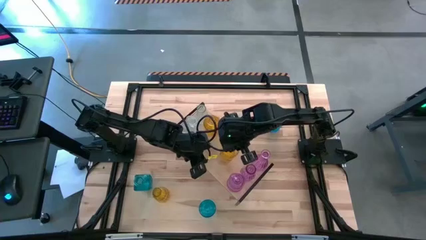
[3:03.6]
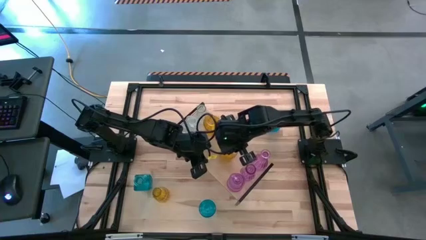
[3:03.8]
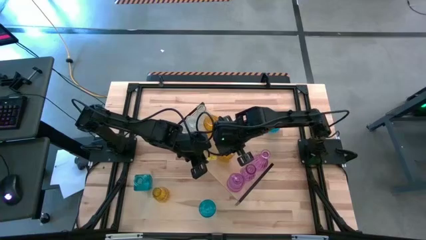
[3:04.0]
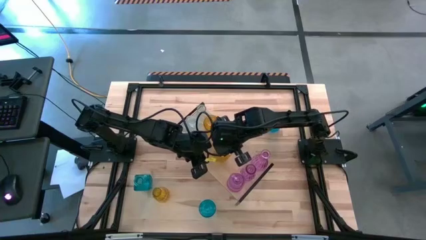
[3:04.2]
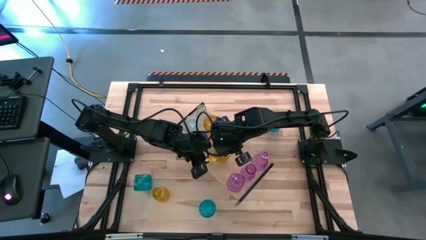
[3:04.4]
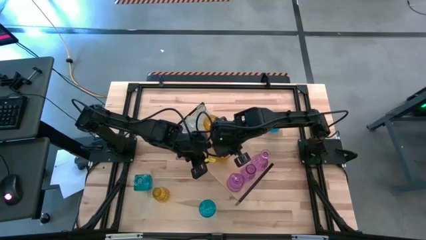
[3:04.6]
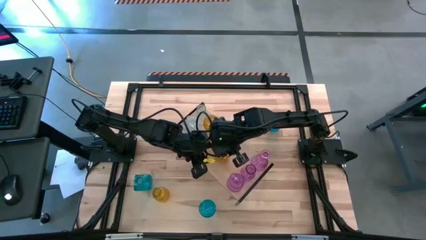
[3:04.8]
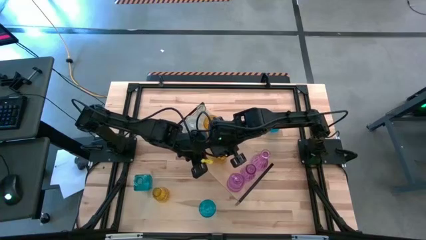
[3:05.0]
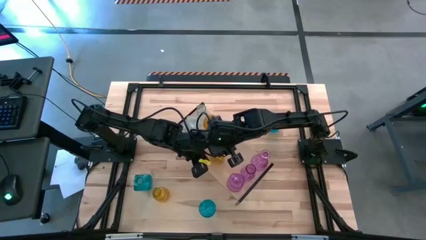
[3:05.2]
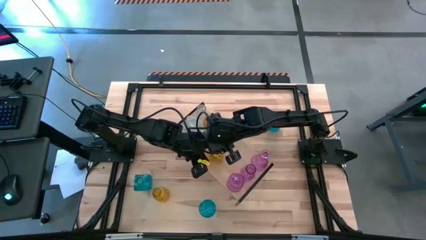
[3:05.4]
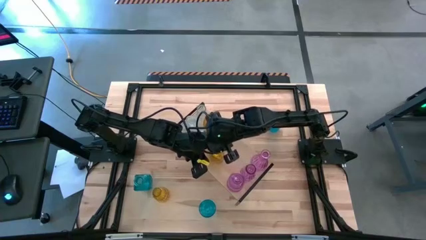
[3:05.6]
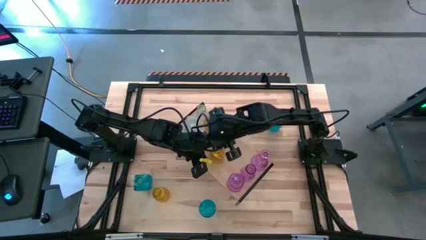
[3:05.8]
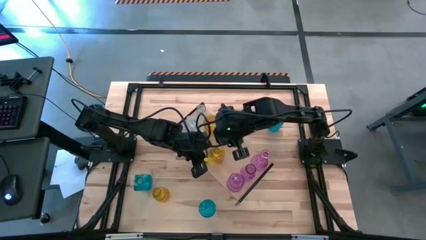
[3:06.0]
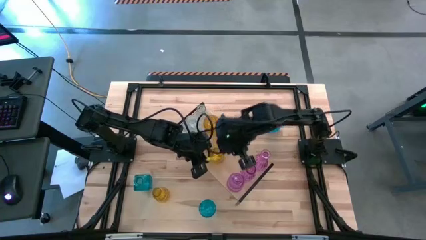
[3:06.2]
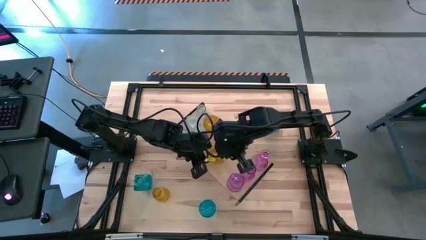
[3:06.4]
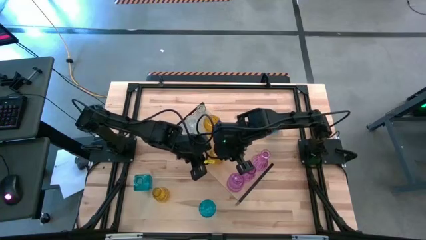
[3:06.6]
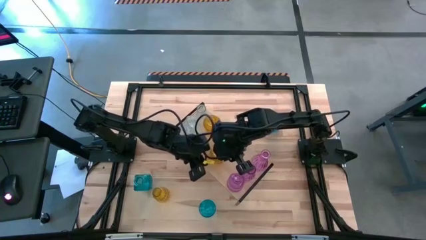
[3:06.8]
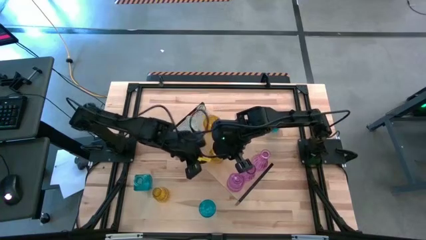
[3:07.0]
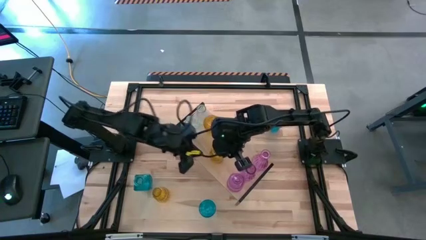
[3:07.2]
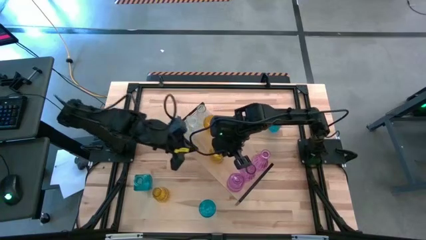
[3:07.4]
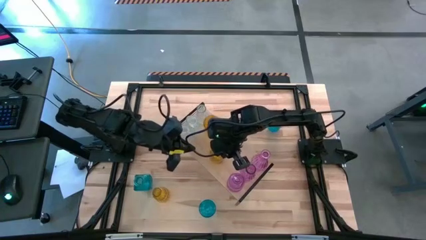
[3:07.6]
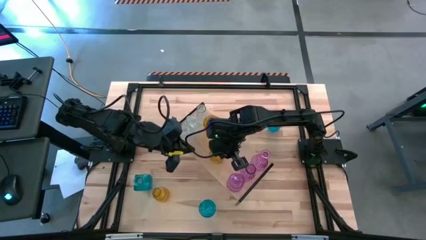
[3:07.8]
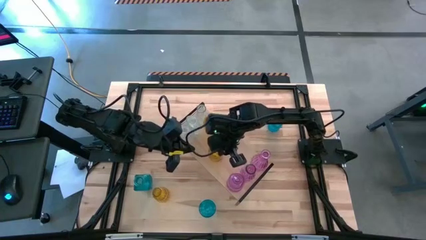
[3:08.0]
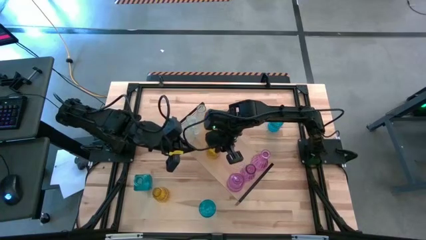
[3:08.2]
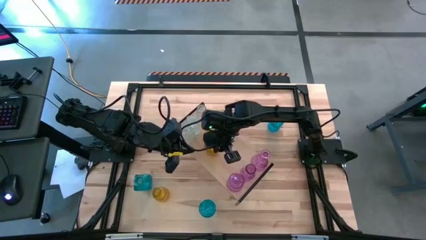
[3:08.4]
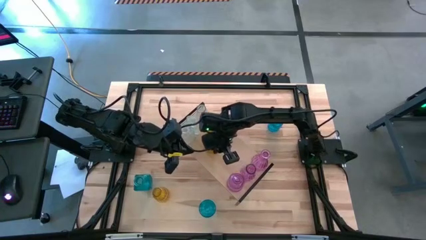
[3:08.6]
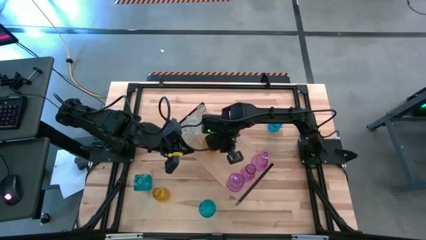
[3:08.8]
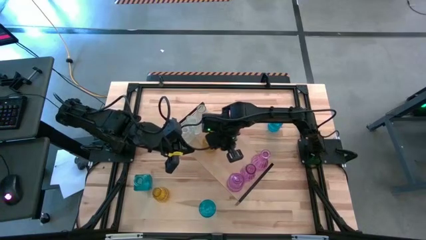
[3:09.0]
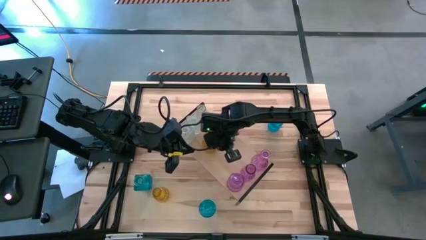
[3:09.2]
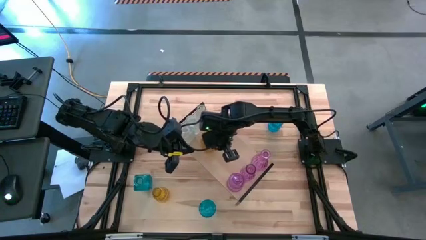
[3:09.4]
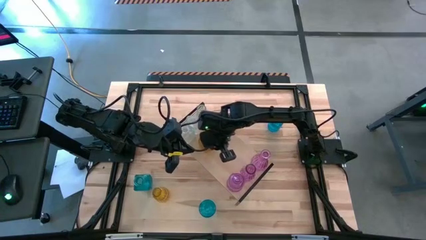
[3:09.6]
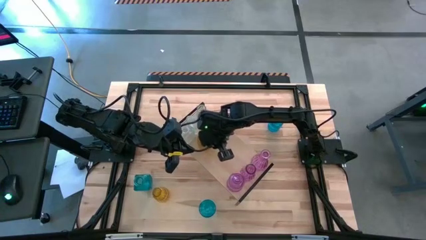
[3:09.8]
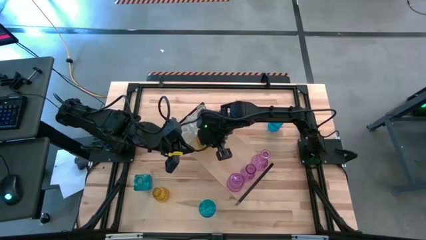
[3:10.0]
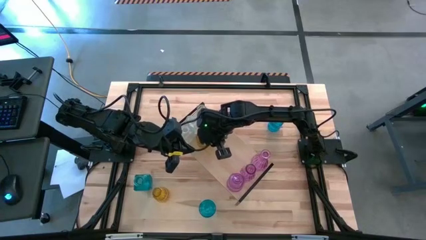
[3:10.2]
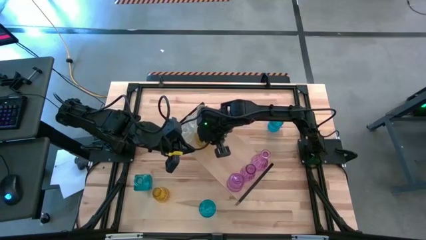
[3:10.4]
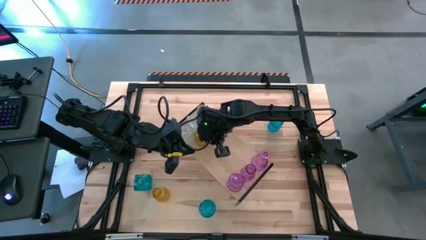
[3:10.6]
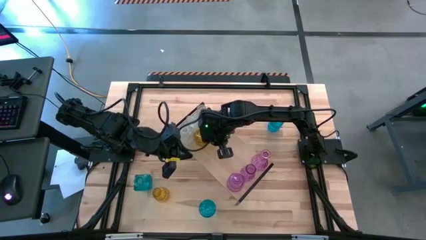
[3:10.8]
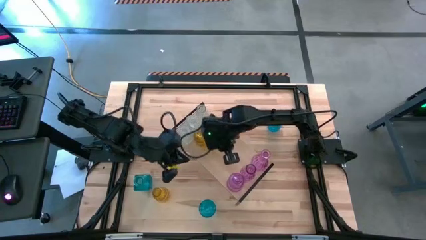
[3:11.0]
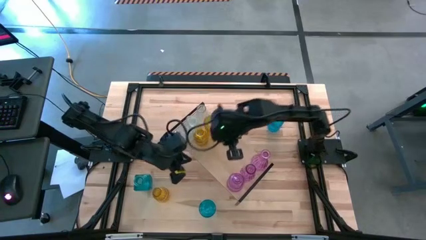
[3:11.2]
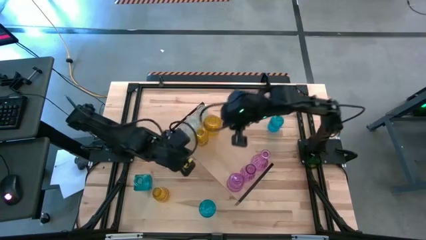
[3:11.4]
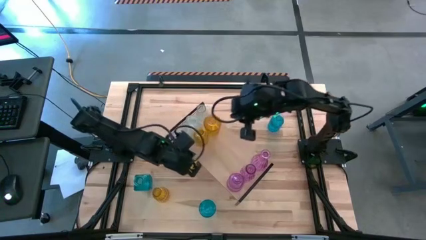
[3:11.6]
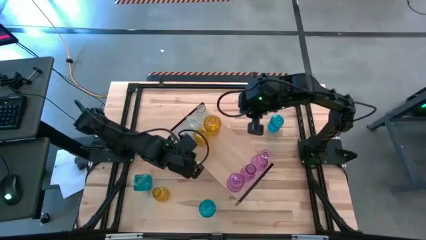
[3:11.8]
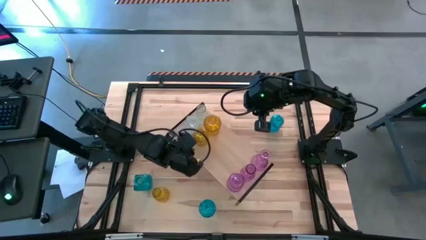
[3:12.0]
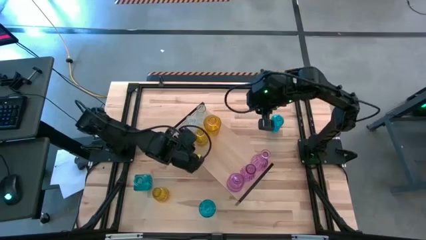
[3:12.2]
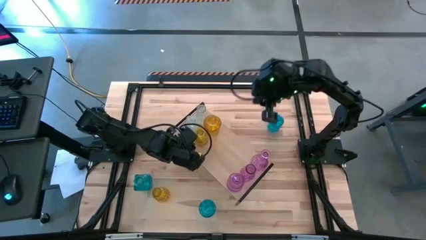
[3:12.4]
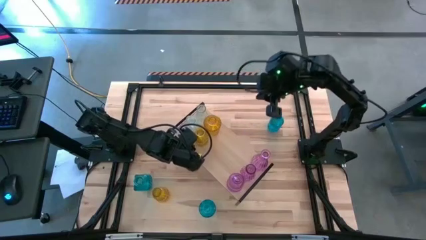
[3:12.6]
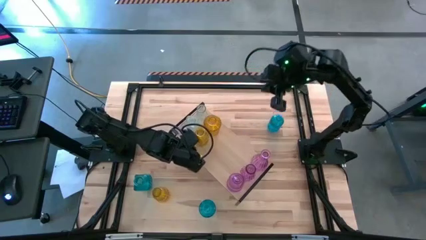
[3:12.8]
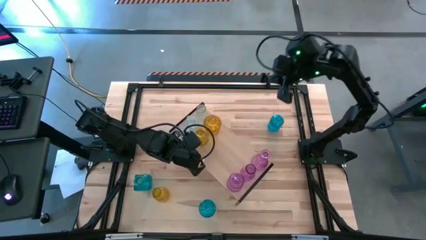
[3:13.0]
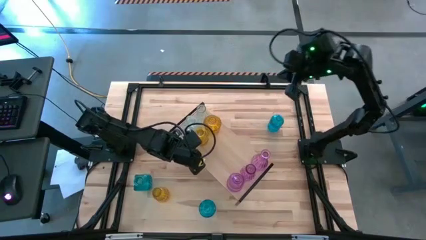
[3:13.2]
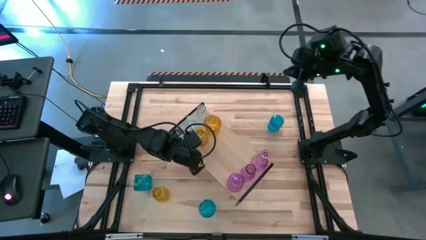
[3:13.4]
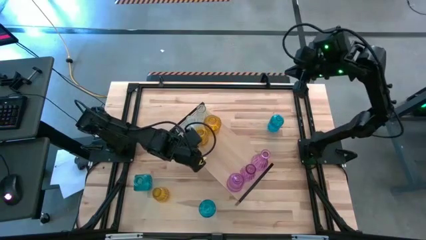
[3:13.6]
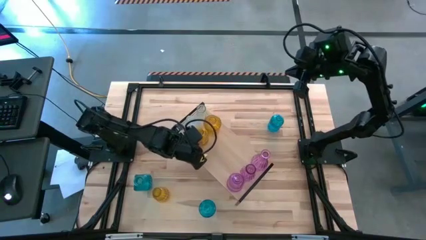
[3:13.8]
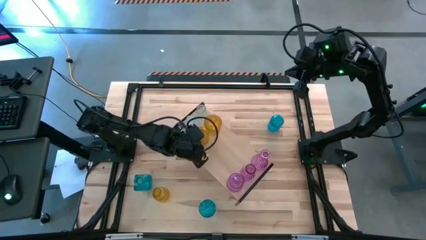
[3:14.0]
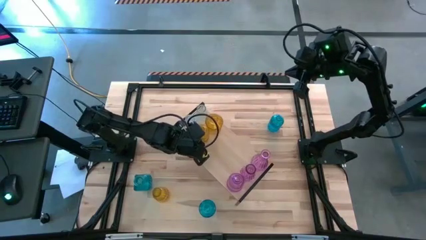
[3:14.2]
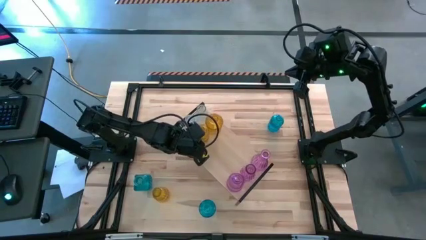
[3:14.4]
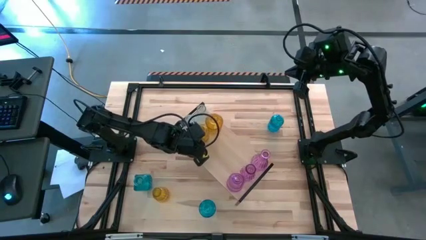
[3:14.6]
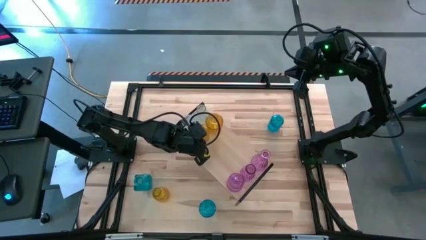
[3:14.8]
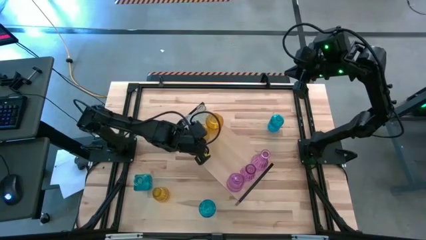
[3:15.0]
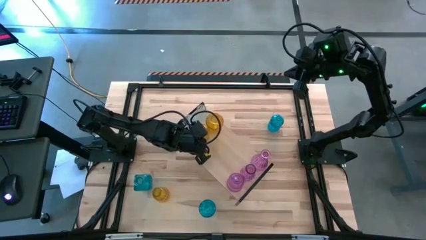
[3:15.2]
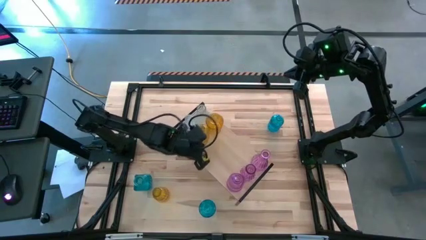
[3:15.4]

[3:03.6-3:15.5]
Task: sort vases onto shelf
Put the top yellow flower vase on the shelf aligned with the other yellow flower vase

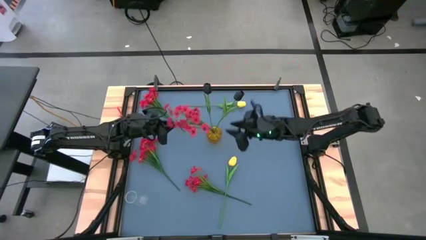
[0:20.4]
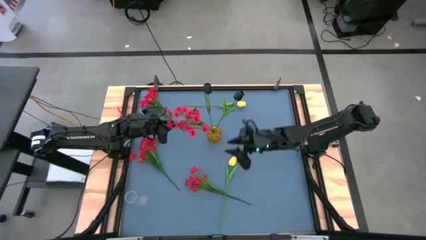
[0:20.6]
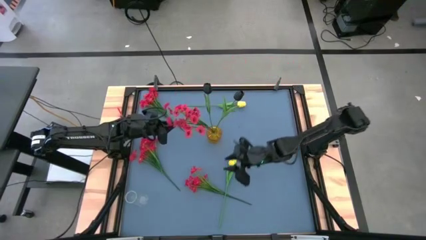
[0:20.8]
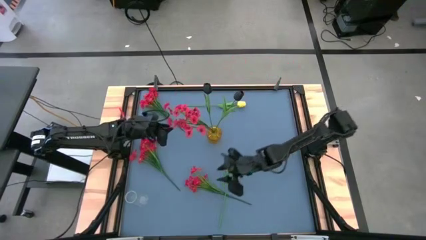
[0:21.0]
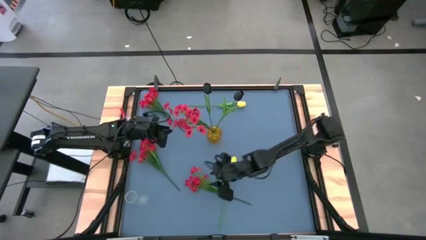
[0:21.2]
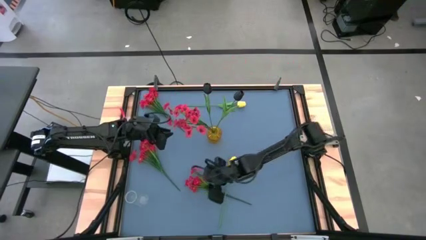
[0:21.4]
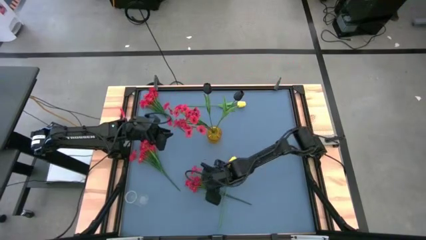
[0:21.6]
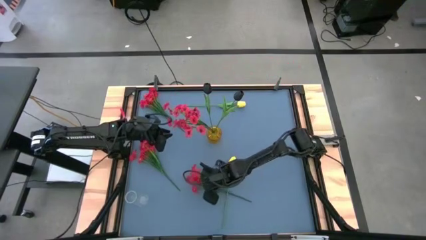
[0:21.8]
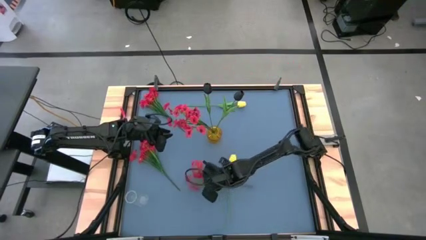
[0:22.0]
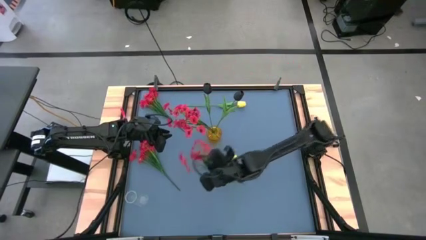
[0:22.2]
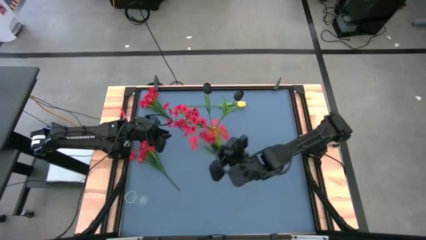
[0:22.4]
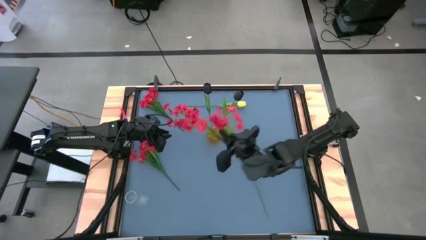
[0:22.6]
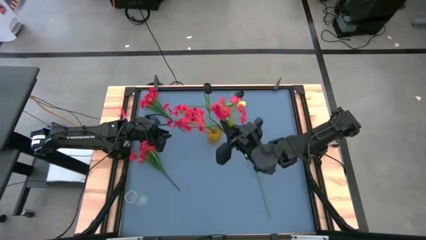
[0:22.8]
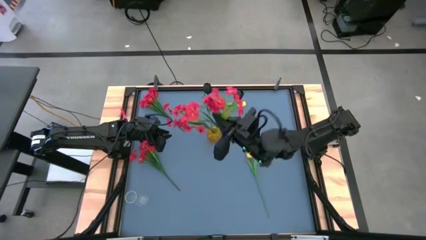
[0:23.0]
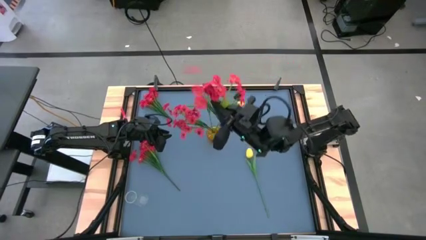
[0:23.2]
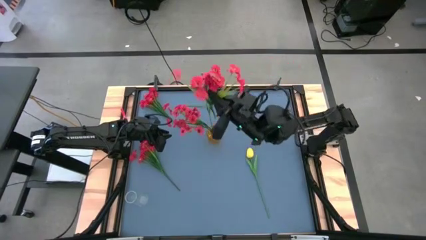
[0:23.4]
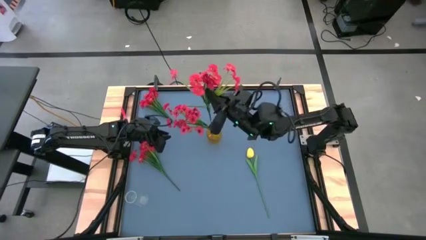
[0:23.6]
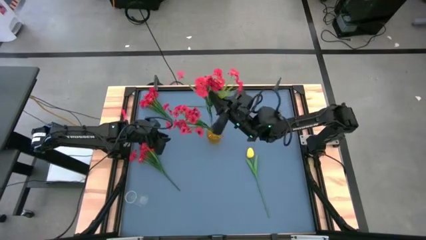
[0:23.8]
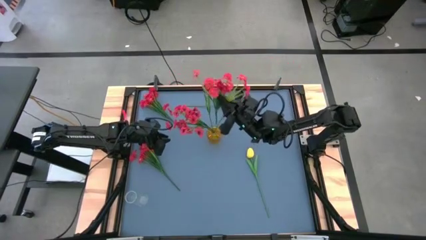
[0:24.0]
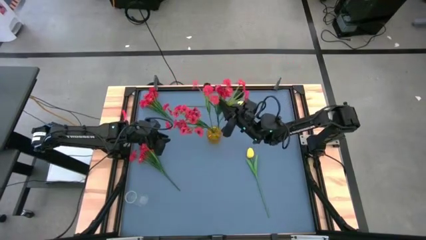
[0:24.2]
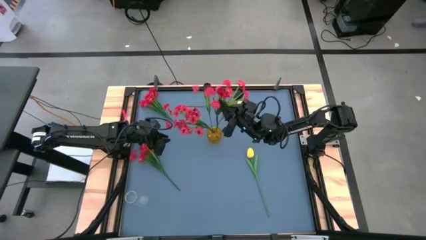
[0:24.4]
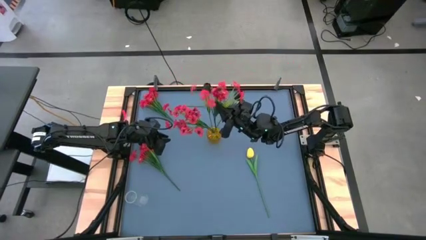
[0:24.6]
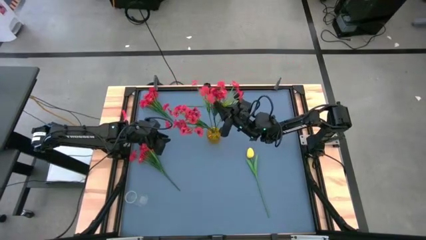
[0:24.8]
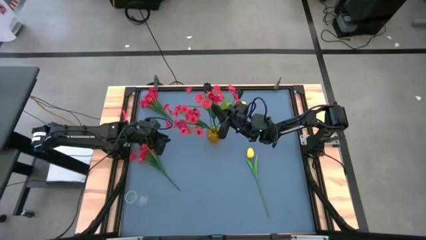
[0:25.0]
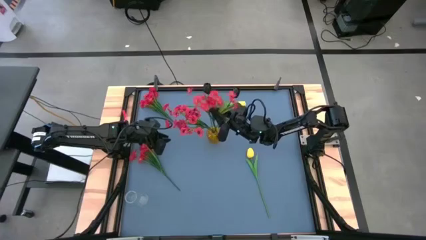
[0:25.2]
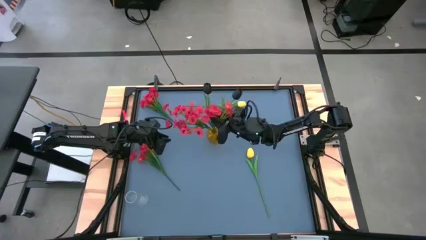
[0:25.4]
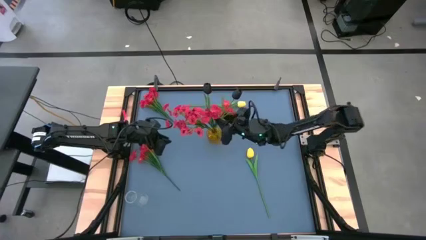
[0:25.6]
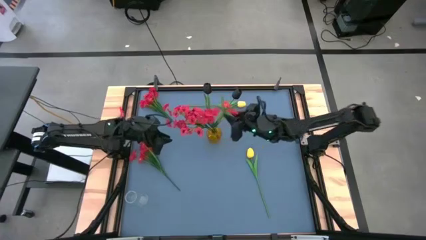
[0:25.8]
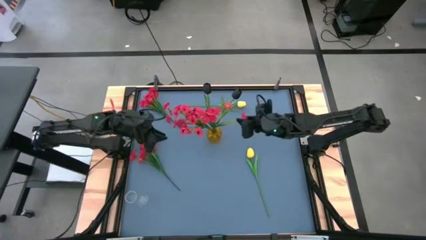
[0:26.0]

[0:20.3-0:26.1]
Task: Sort flowers into vase by color
Put the bottom right red flowers into the yellow vase
